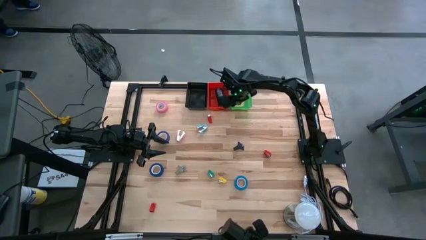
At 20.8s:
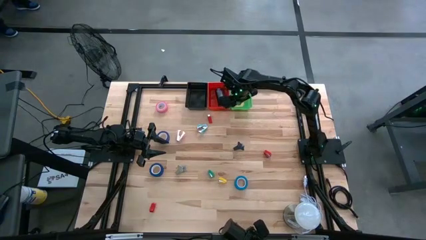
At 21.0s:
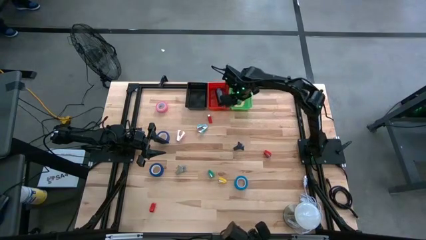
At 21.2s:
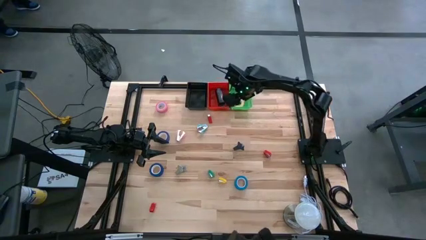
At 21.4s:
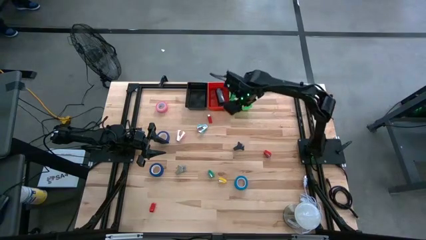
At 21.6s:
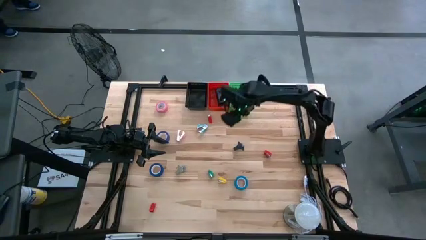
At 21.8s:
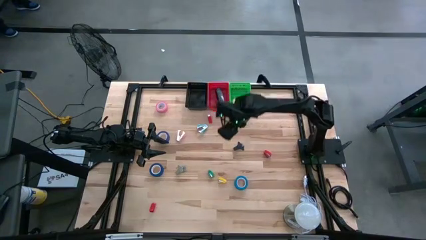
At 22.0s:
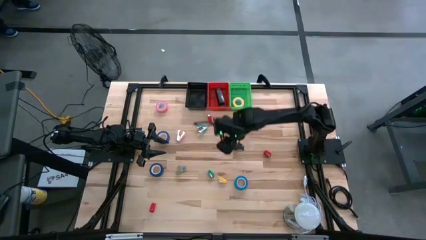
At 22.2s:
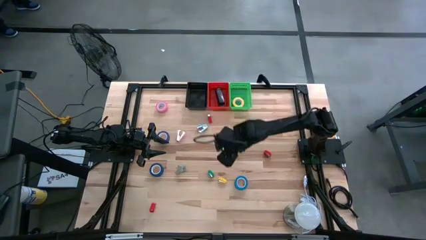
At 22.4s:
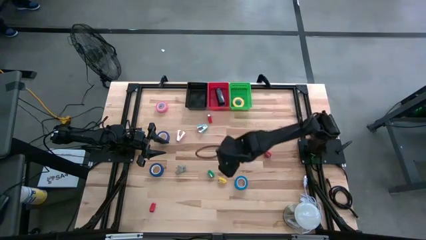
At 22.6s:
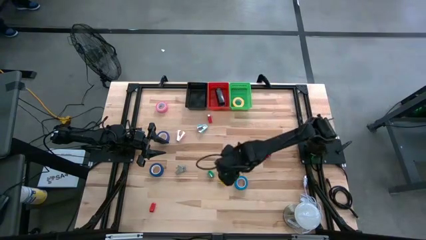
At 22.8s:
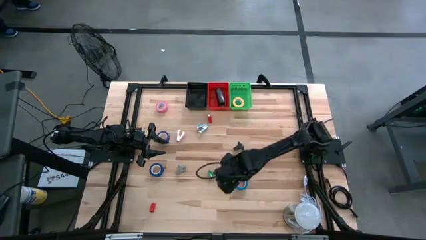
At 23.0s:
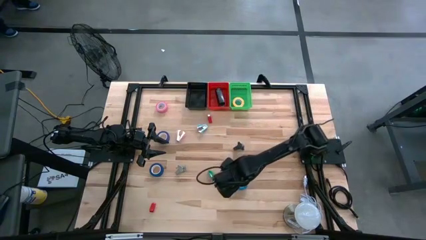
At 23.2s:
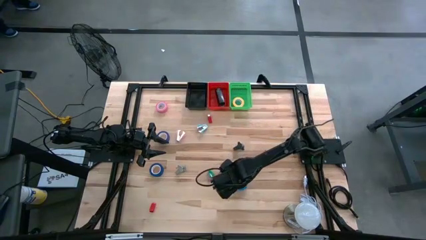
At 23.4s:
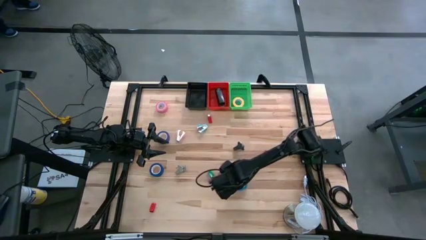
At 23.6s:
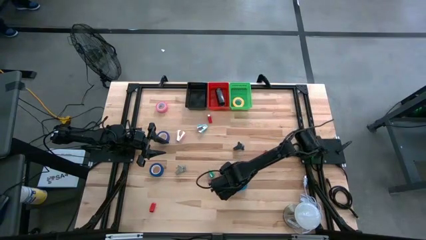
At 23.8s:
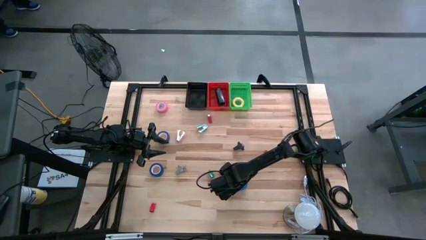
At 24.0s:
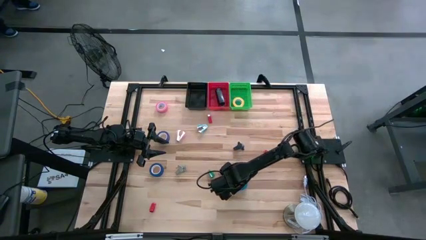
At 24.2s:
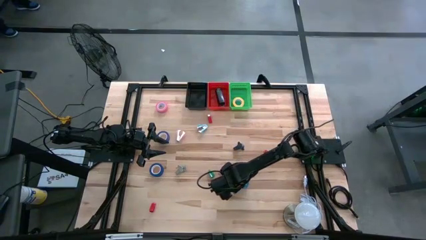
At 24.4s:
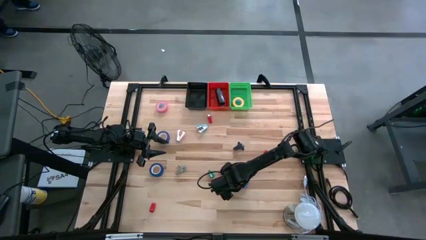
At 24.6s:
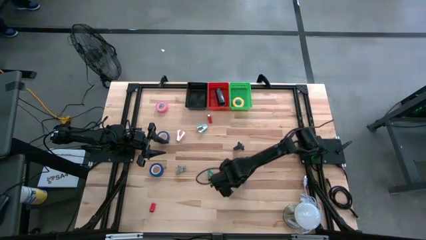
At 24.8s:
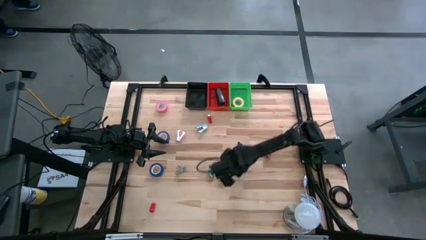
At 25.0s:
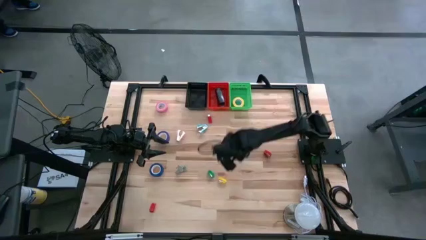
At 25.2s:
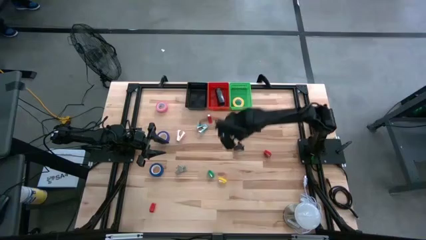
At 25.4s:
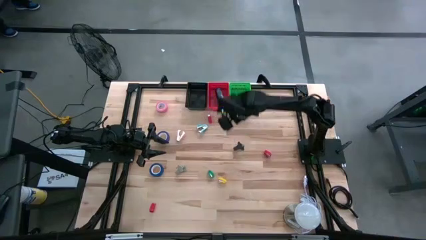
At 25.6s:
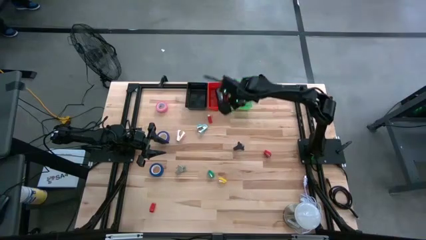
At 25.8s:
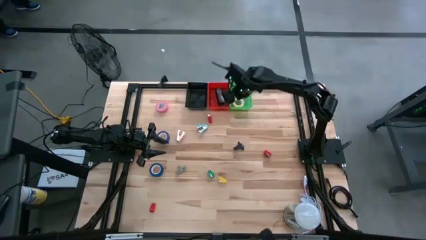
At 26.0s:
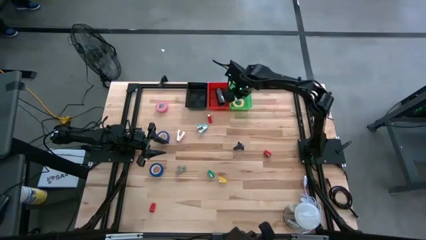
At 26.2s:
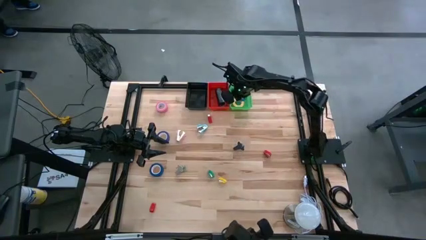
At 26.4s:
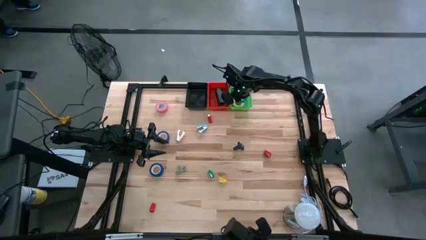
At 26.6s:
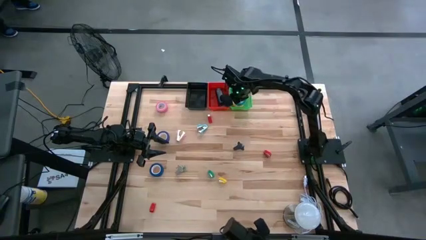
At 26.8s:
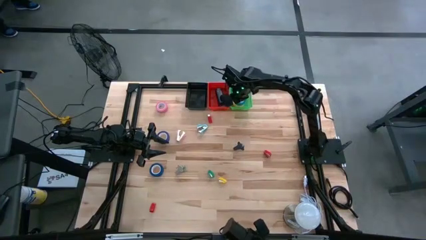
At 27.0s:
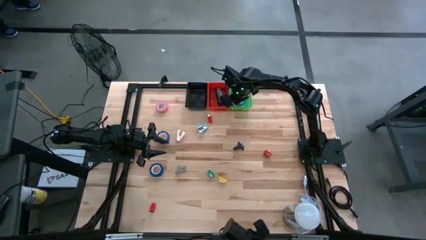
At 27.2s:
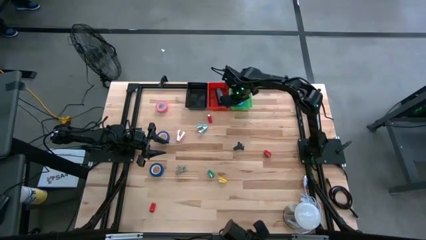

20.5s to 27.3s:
Task: Pick and place Stapler, Stapler remover, tape
Put the light blue tape into the green bin

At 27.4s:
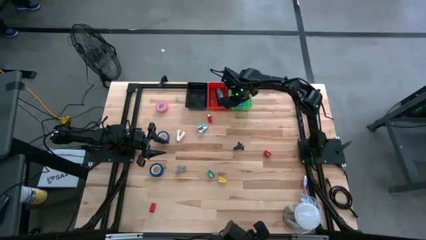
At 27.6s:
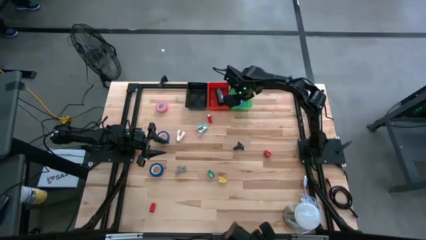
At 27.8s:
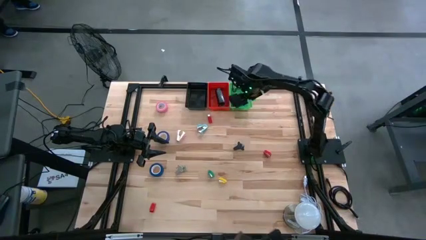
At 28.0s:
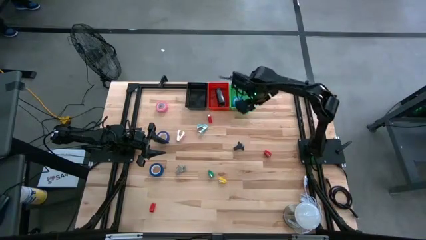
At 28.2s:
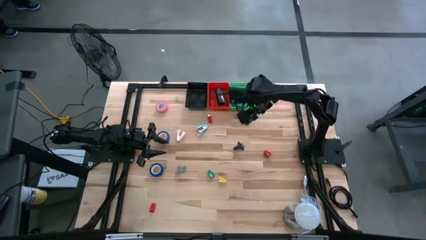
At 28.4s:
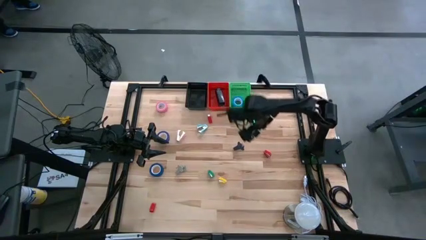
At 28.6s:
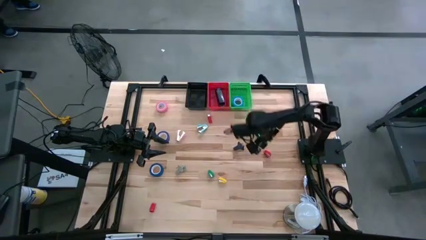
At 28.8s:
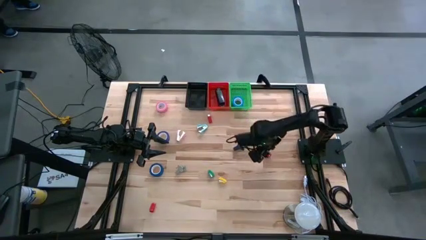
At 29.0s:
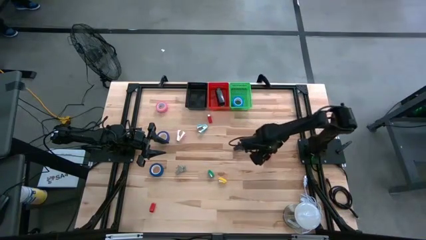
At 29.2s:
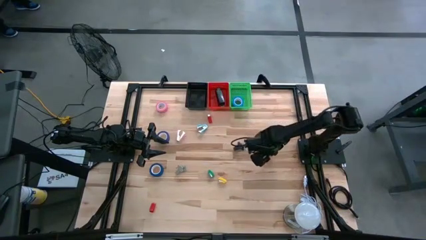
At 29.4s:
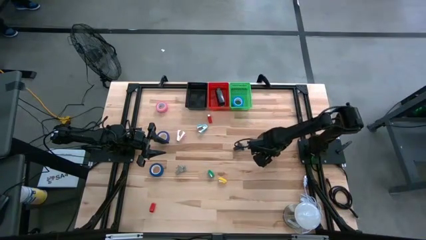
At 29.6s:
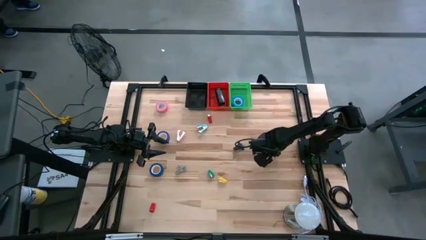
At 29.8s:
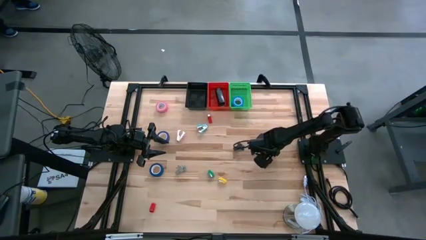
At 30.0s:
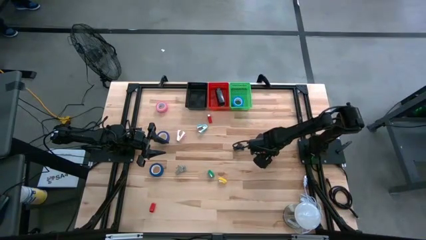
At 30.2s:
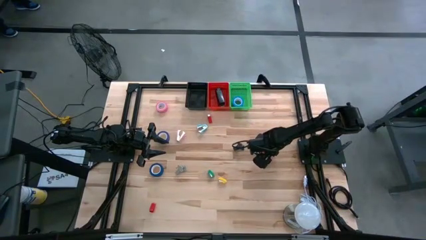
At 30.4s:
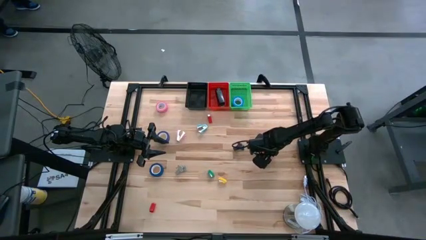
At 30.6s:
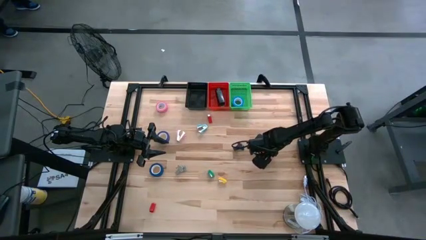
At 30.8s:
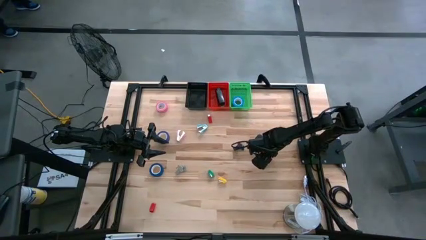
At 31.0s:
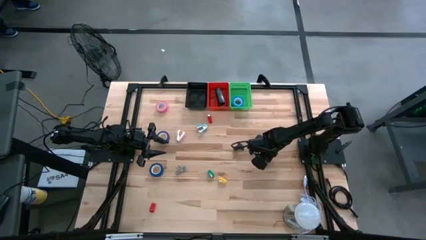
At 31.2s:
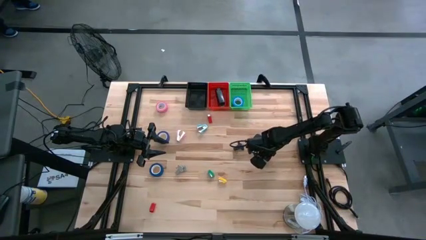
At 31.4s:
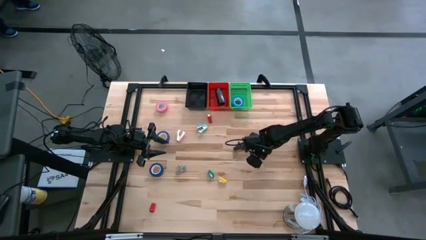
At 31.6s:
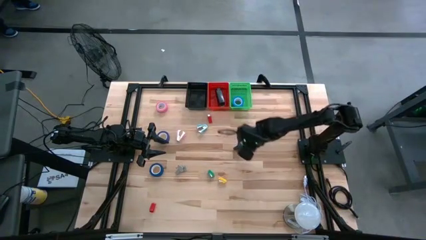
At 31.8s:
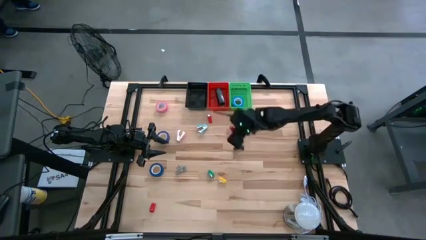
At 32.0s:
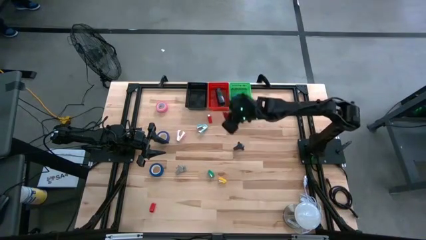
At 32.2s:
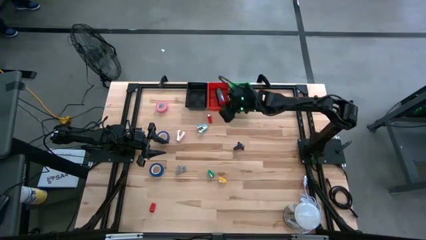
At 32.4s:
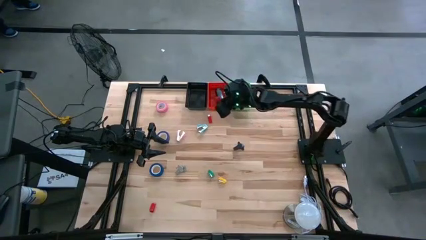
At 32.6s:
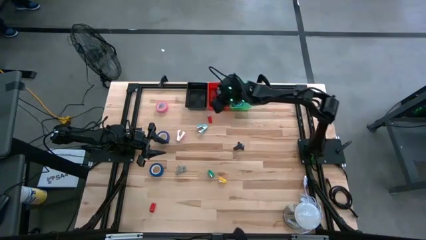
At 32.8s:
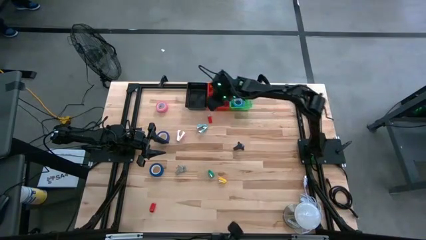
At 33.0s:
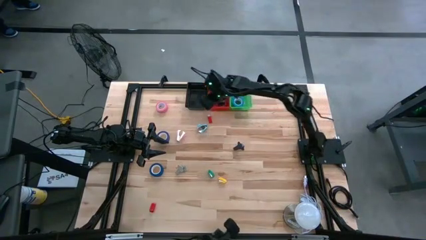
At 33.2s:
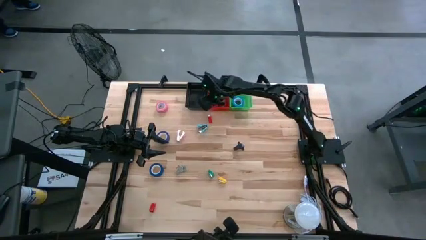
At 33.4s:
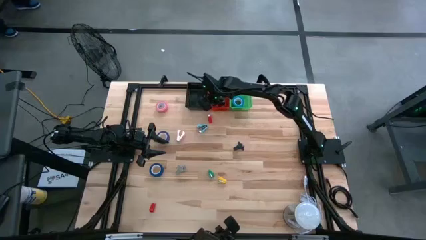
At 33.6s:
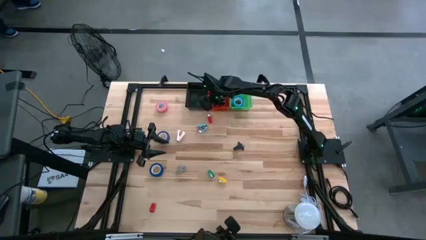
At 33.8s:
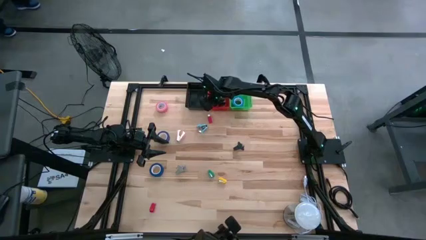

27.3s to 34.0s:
Put the middle right small red stapler into the red bin

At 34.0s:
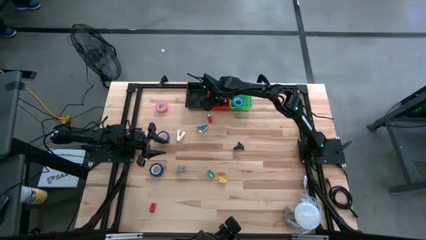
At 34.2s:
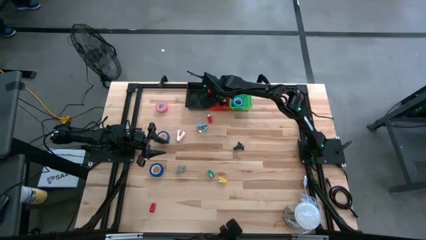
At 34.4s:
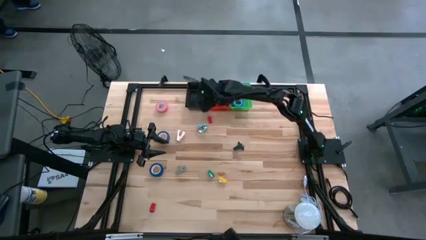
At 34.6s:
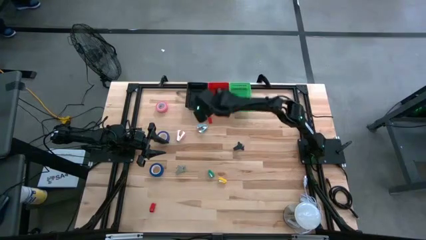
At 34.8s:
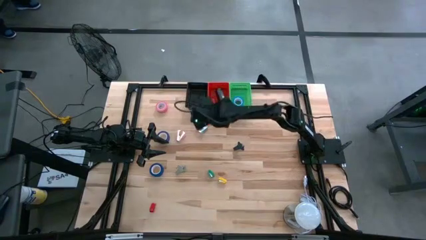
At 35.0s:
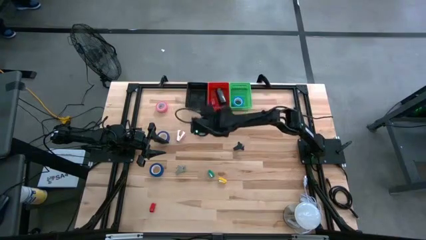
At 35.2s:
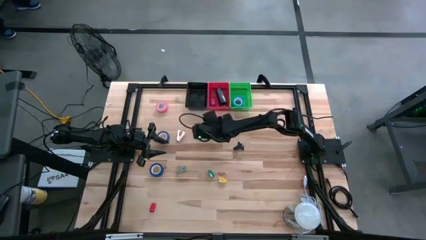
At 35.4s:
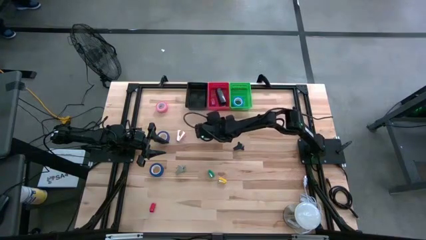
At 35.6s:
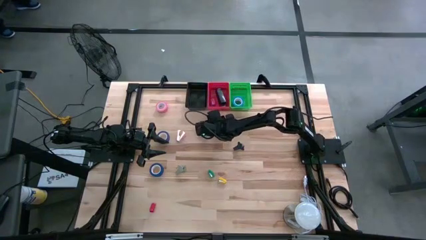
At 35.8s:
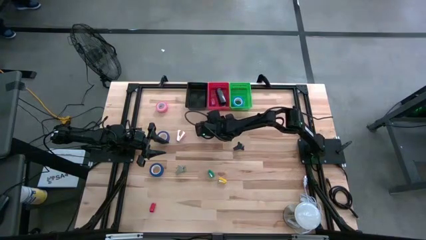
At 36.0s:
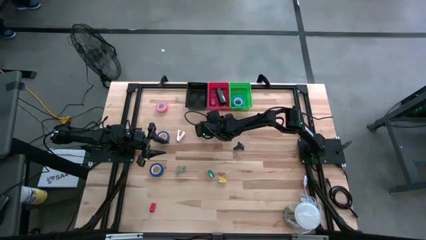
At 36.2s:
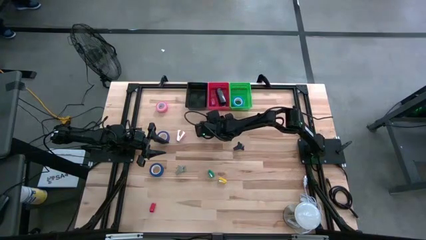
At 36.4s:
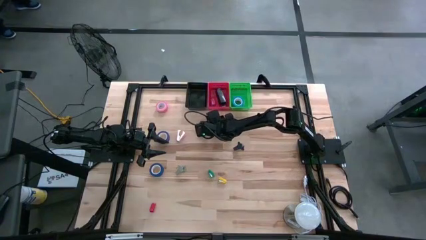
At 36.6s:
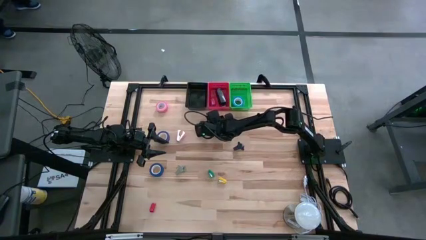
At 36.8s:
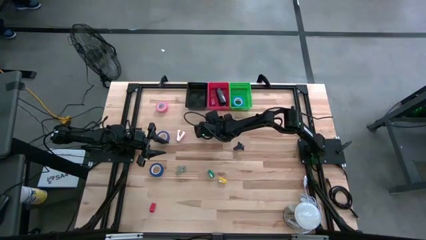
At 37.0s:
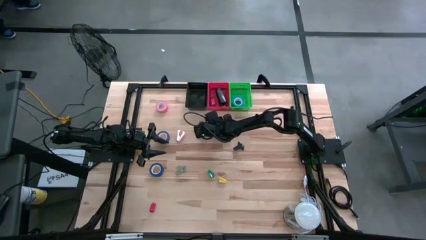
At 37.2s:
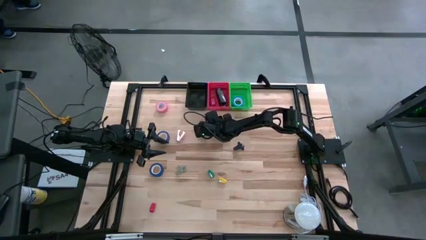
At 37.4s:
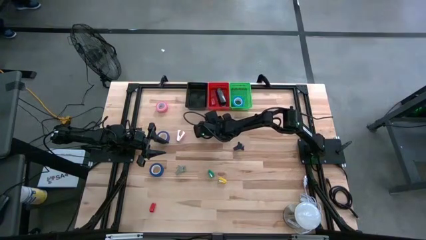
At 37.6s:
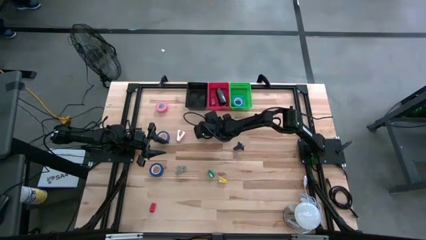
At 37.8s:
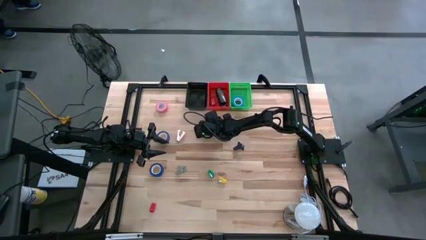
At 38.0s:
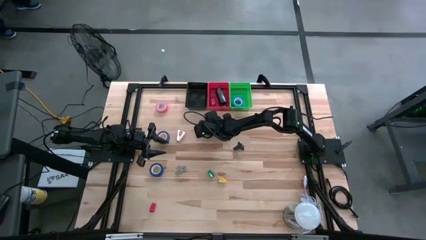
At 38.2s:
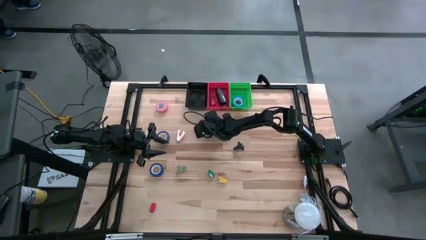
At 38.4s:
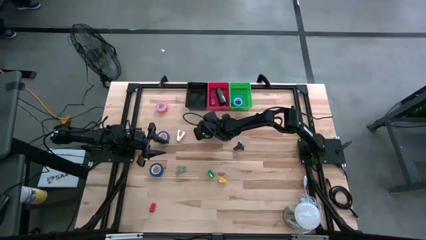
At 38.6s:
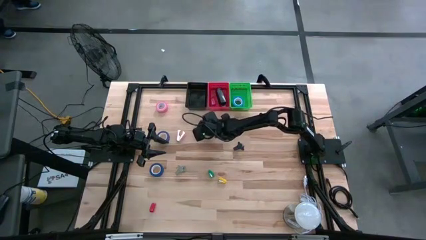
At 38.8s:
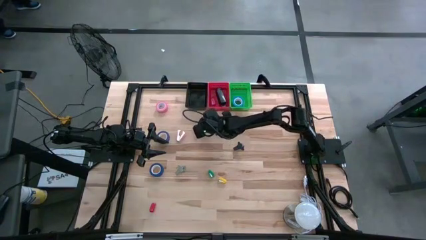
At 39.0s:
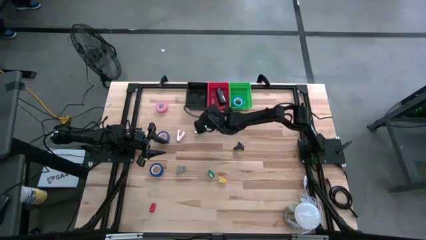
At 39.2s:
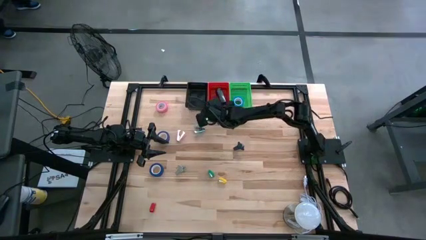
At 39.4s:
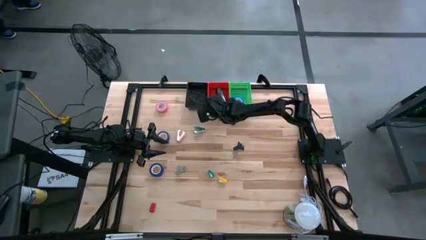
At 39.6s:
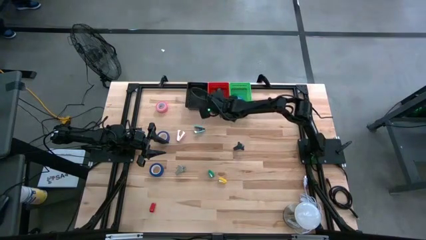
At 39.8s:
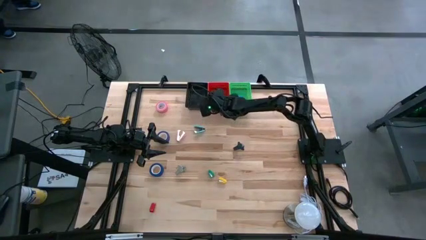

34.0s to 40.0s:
Put the top small red stapler into the red bin
